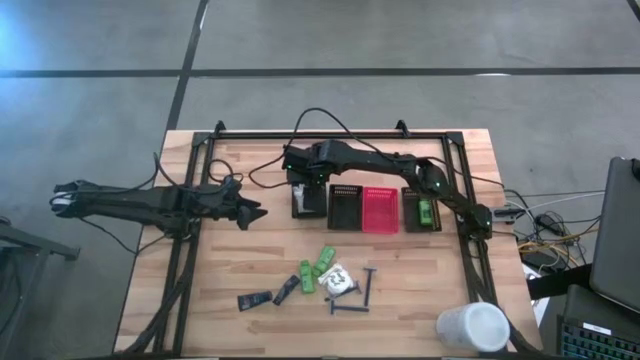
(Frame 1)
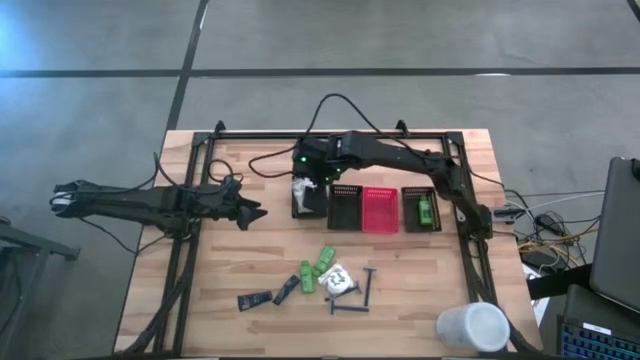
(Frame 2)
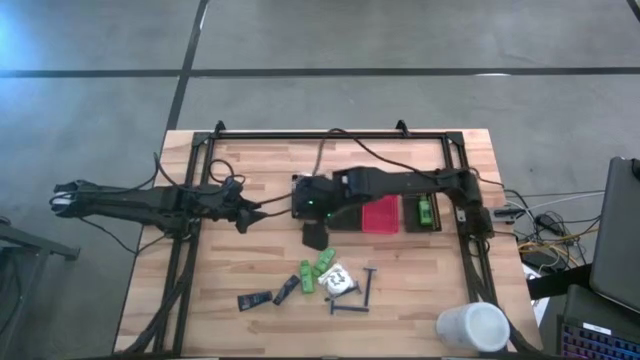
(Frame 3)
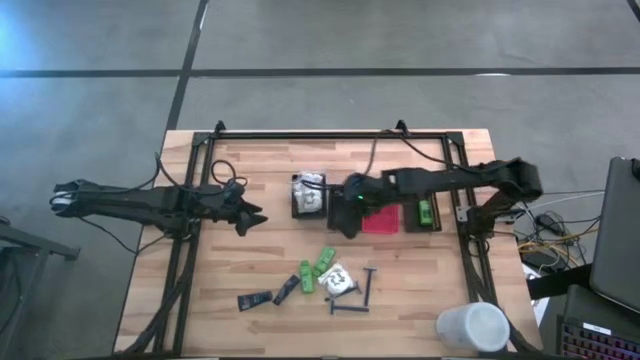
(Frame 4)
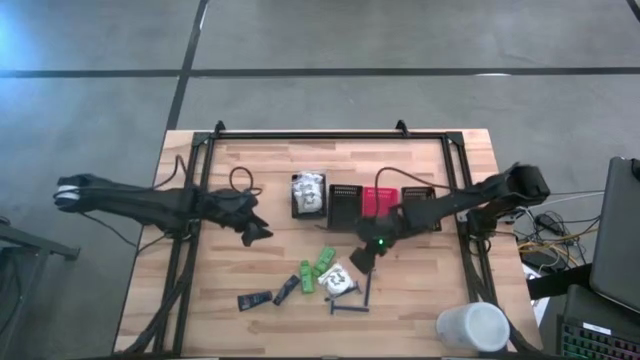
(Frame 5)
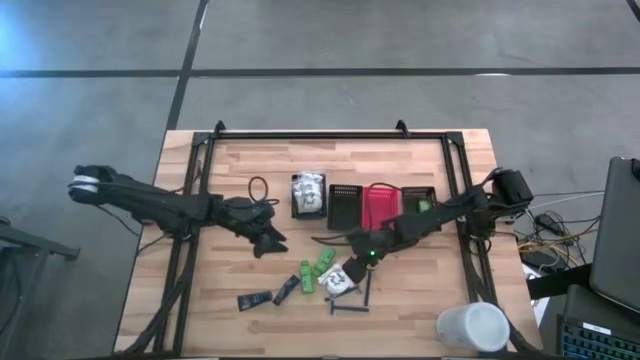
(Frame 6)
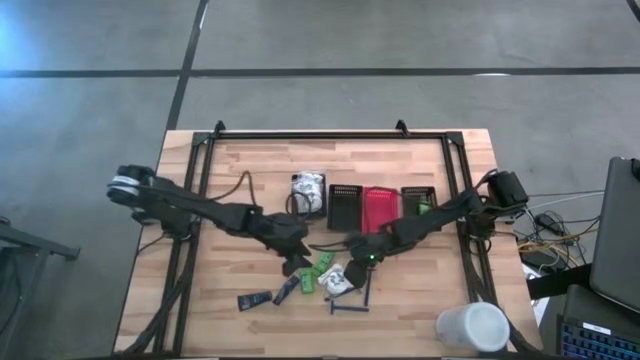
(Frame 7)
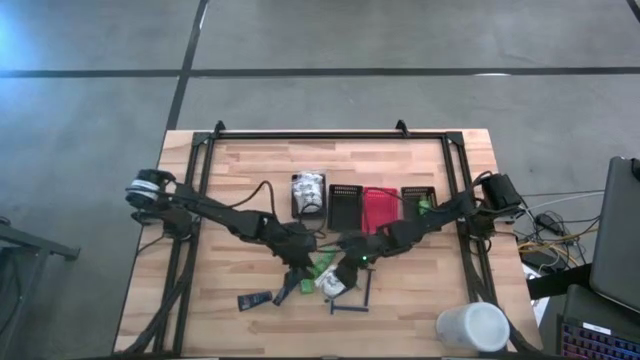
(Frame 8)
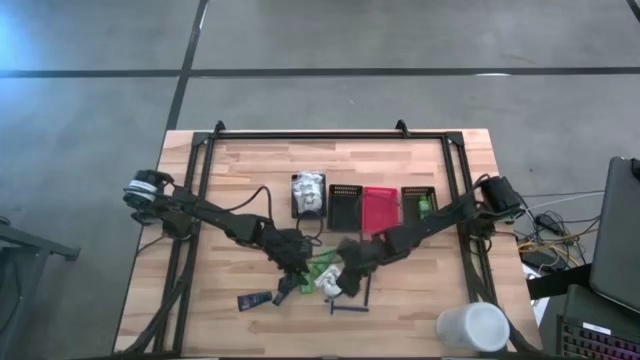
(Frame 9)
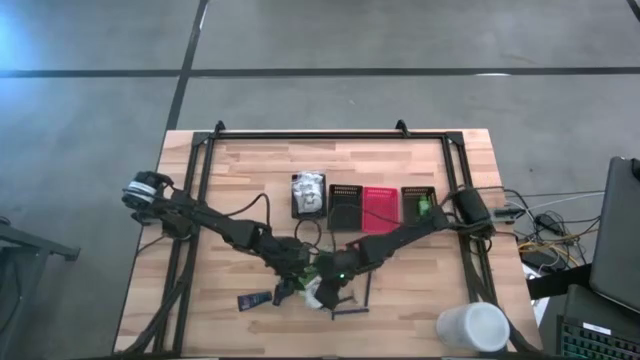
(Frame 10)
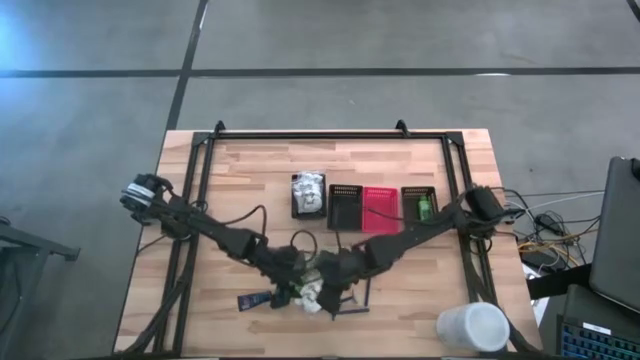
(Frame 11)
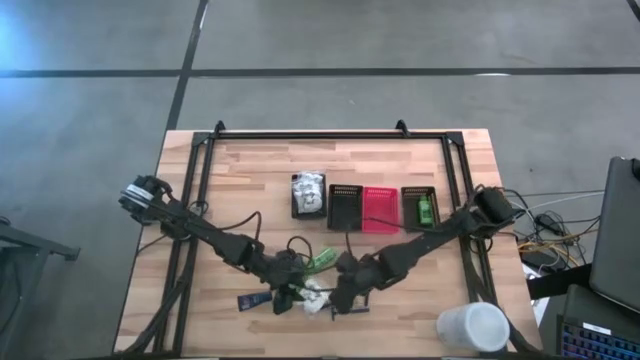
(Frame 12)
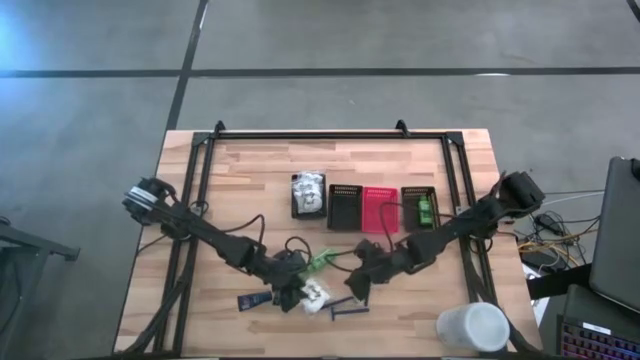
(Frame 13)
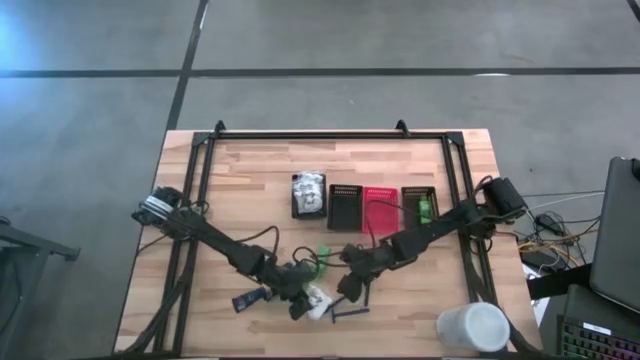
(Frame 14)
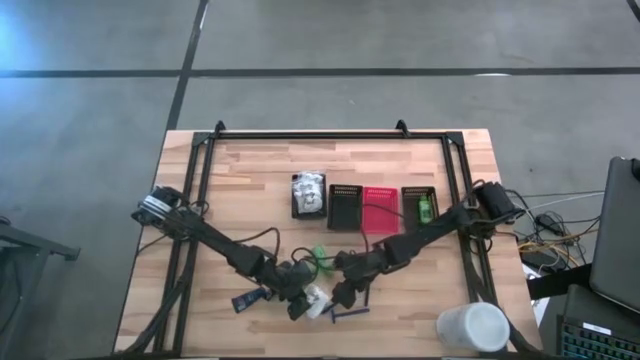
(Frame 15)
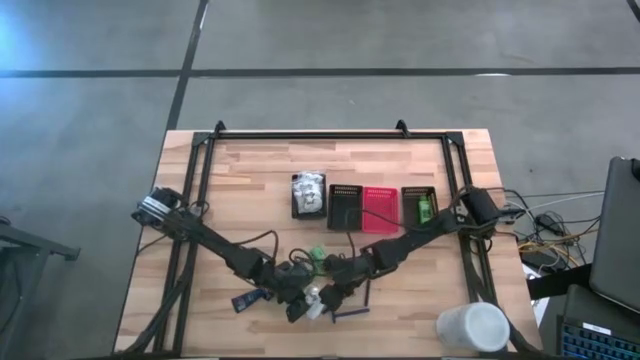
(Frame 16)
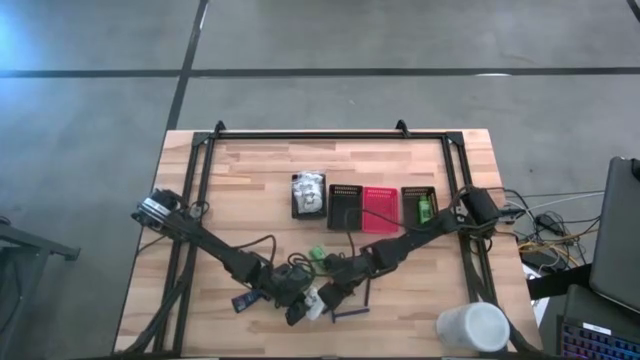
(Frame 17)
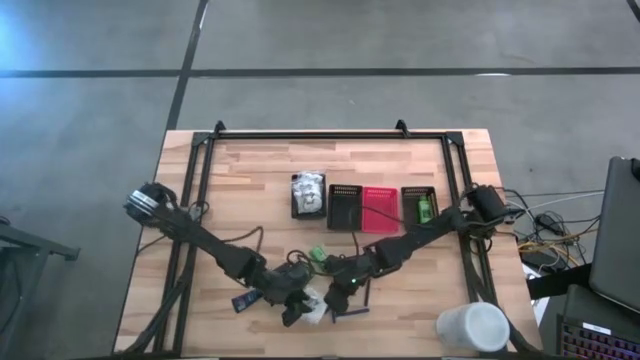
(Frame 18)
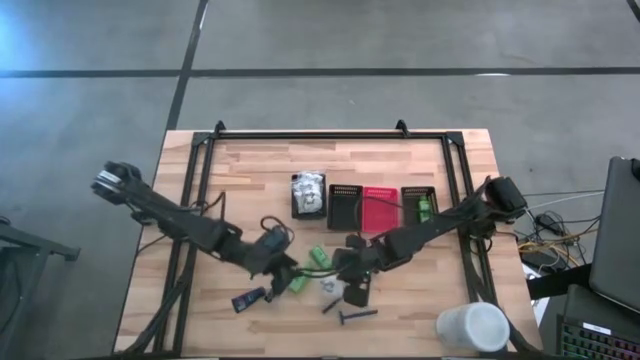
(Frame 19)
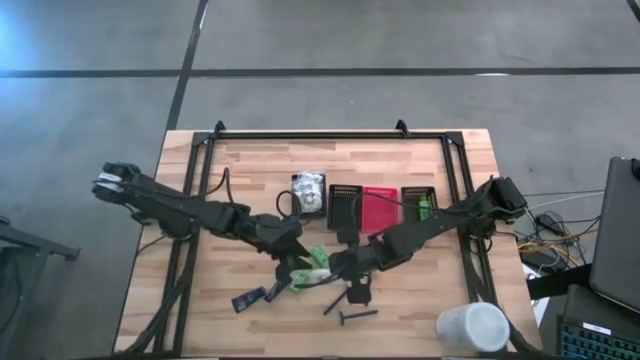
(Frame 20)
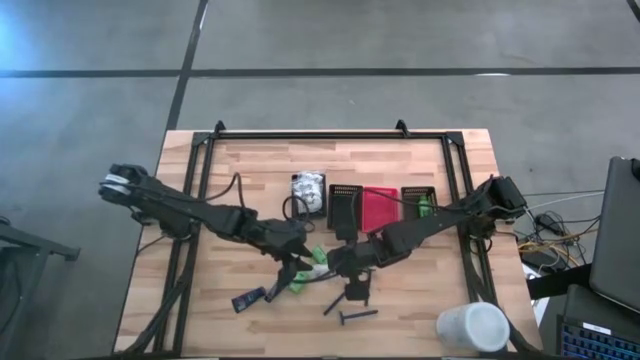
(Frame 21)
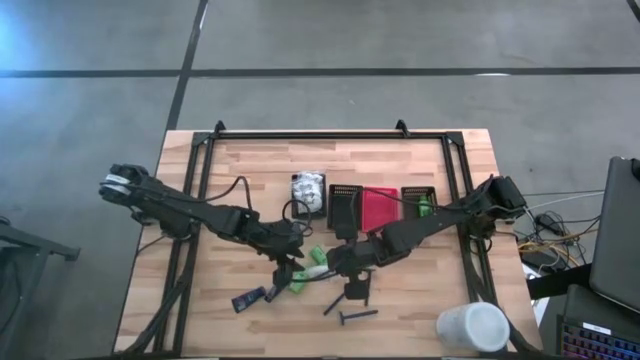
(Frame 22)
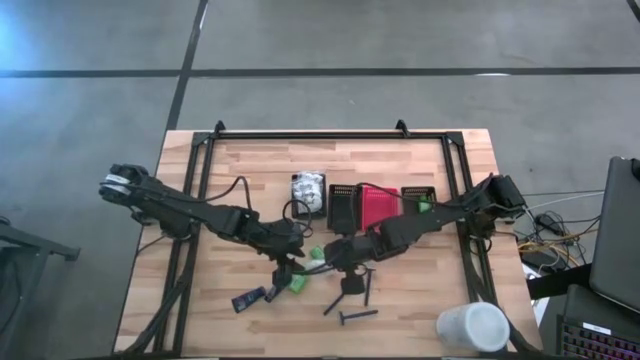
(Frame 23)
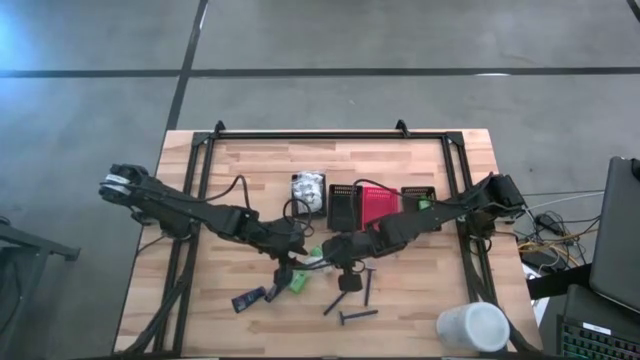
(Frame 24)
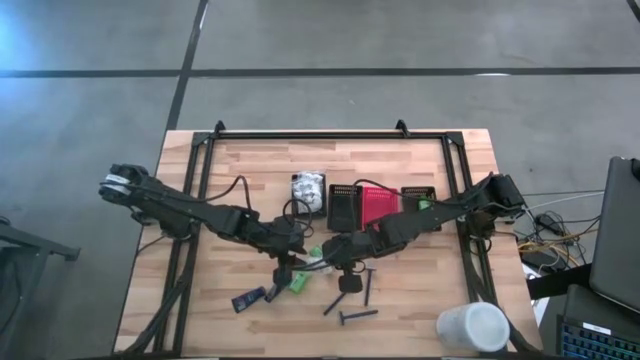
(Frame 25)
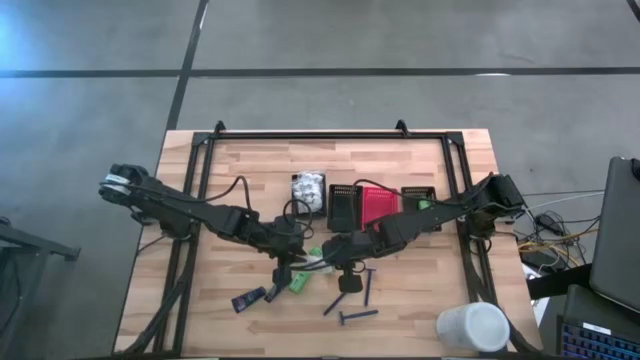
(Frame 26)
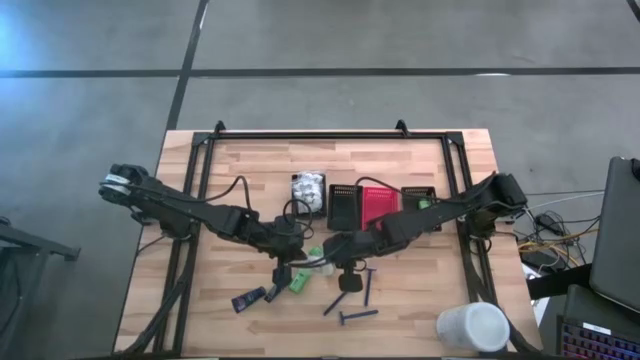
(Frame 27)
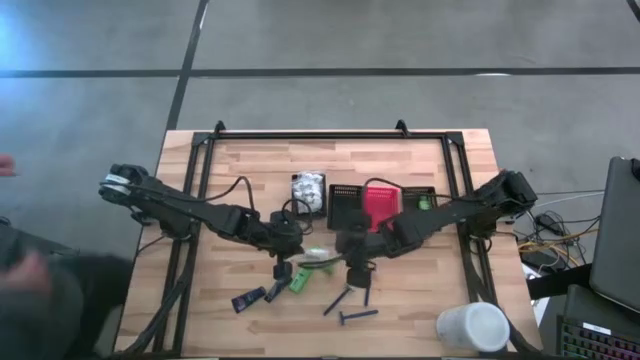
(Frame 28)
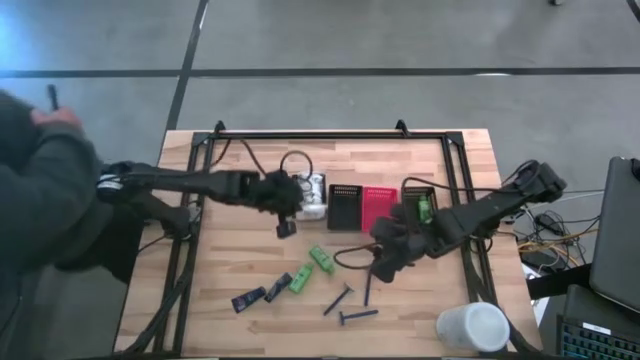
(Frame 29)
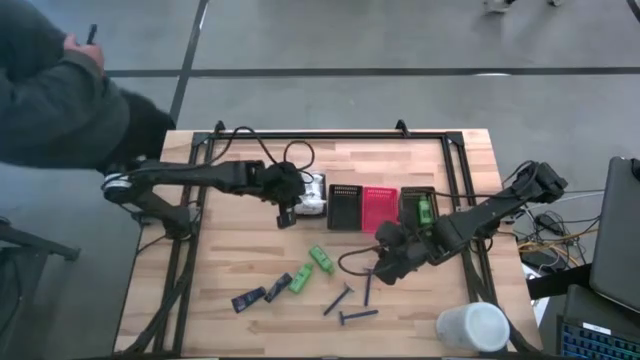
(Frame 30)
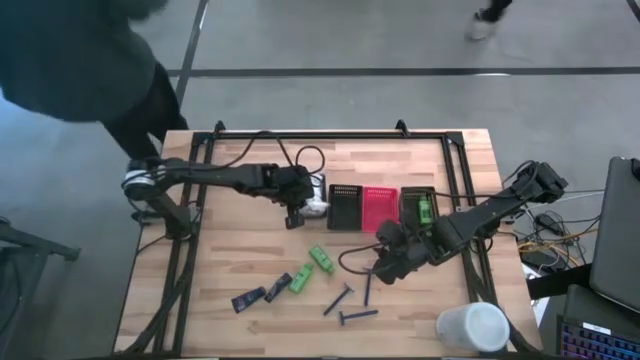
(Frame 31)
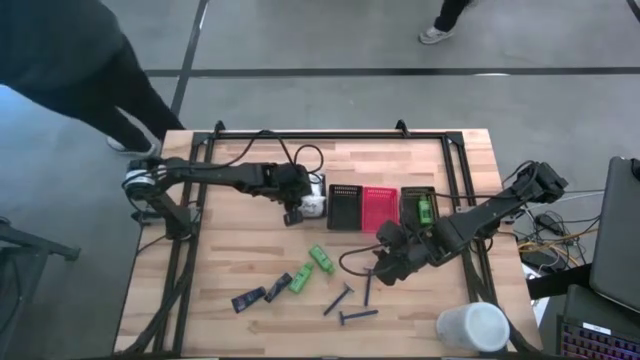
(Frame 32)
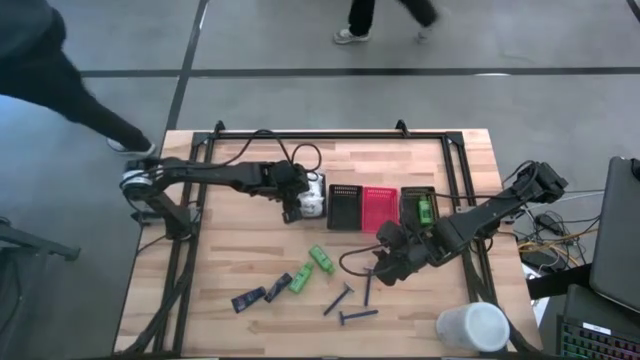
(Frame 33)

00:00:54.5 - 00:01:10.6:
Task: Pick & Place Travel size toiletries
Put the white cotton pack into the left black bin

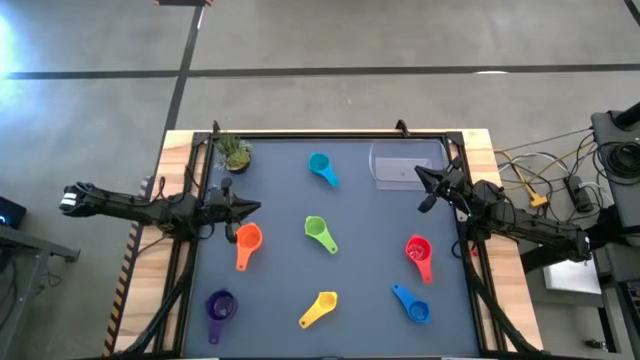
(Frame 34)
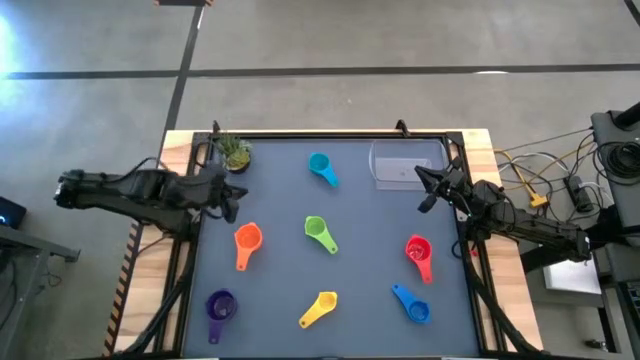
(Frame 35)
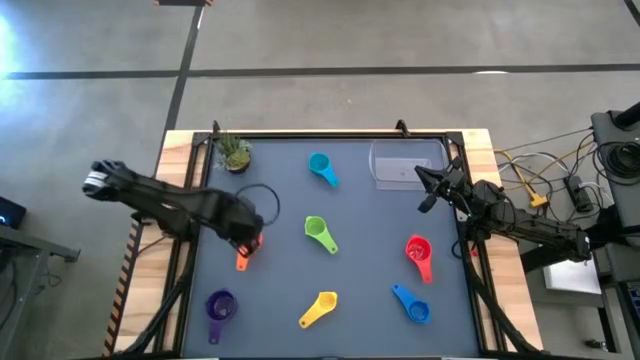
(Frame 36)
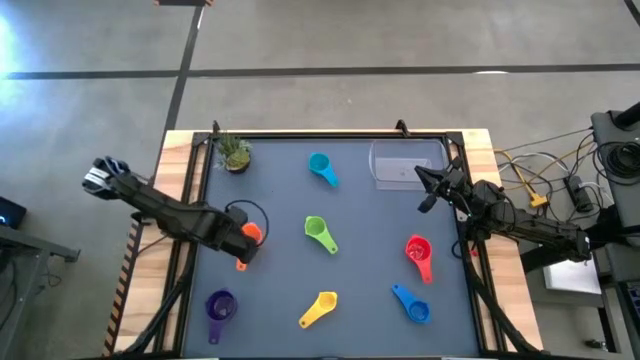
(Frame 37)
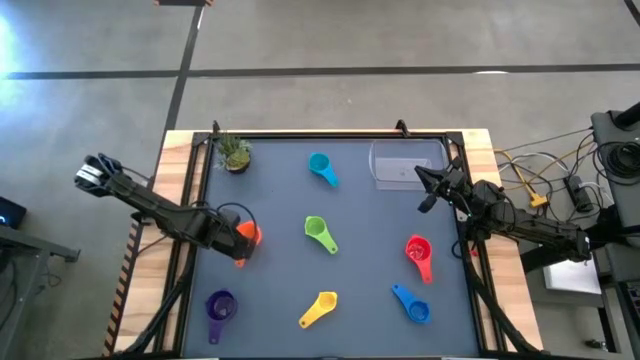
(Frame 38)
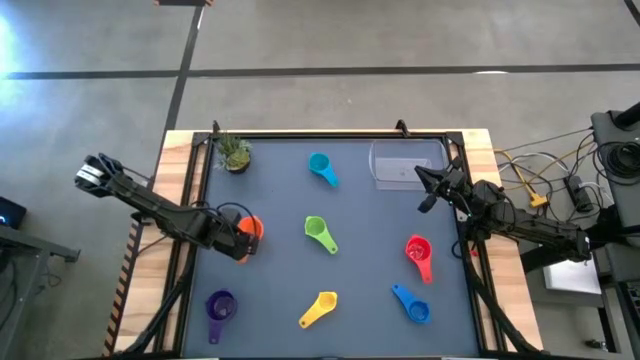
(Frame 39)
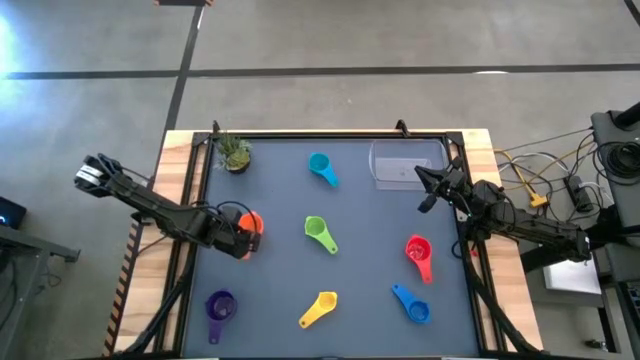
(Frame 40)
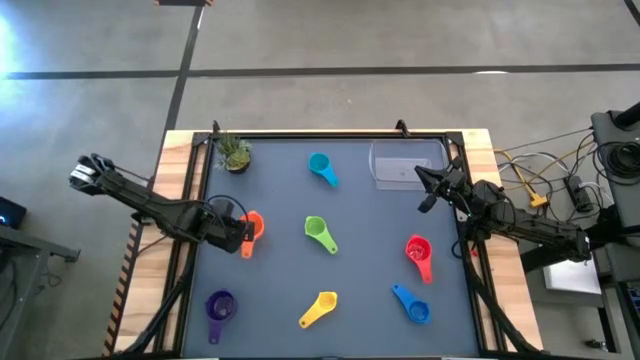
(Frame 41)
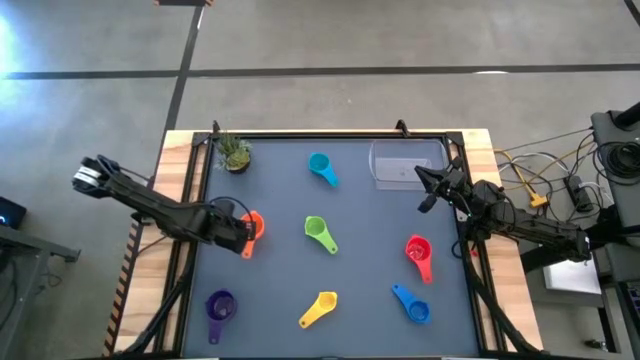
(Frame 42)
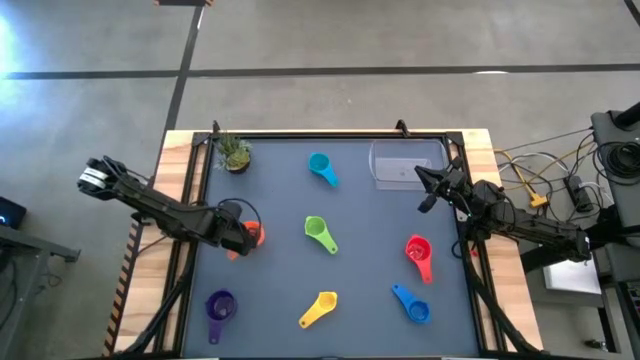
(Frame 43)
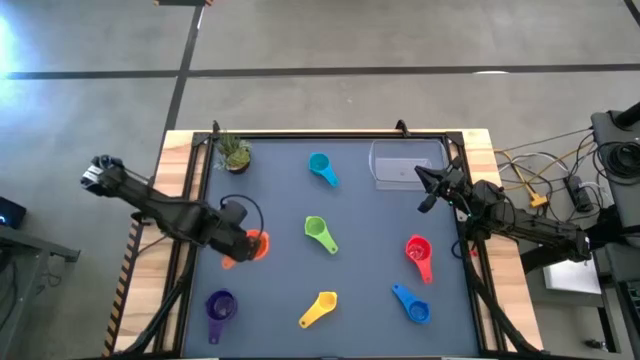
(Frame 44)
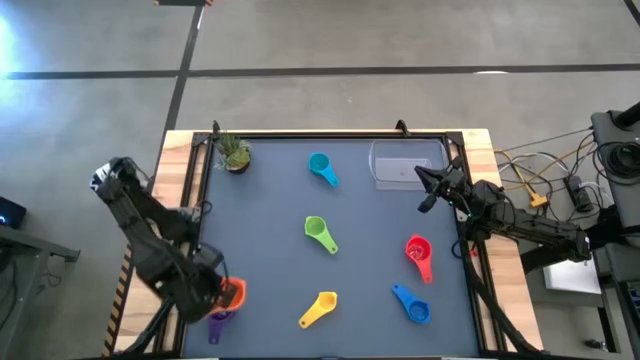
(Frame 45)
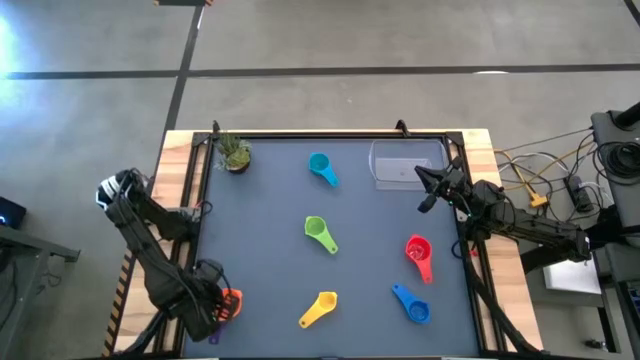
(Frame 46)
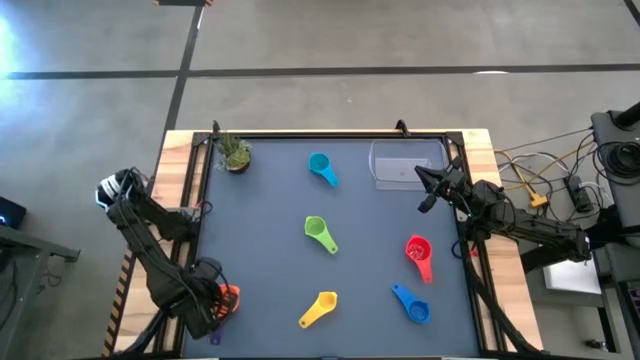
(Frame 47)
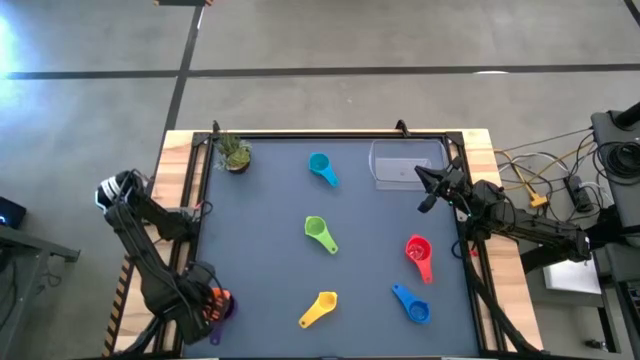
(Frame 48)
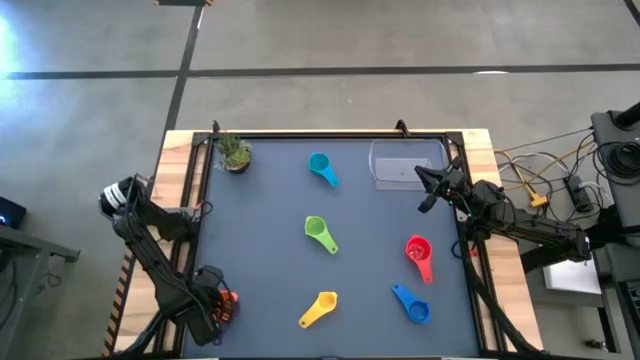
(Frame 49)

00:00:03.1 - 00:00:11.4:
Task: Nest measuring cups in basket
Stack the orange measuring cup on top of the violet measuring cup
